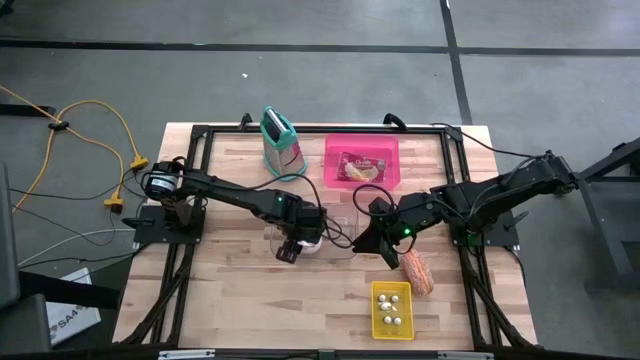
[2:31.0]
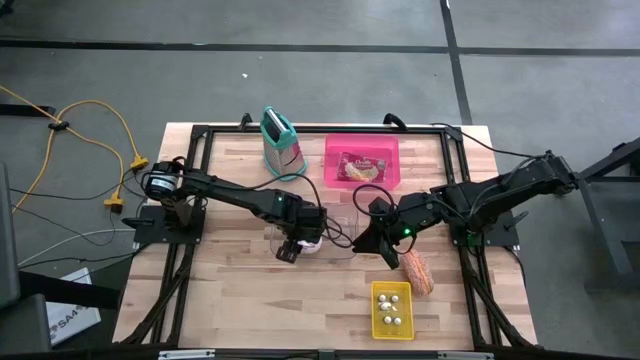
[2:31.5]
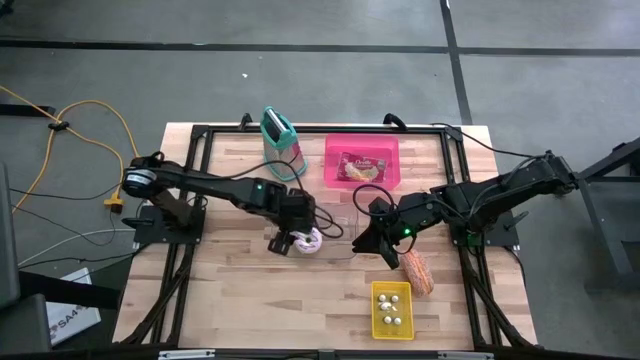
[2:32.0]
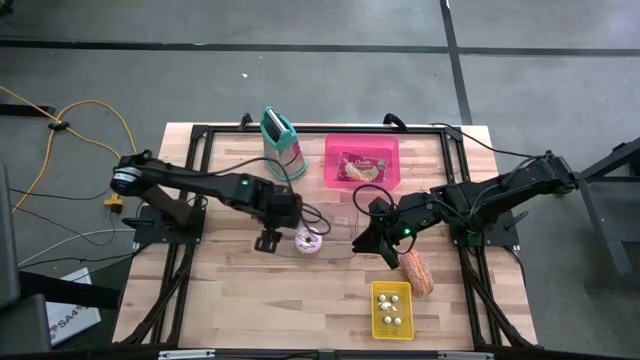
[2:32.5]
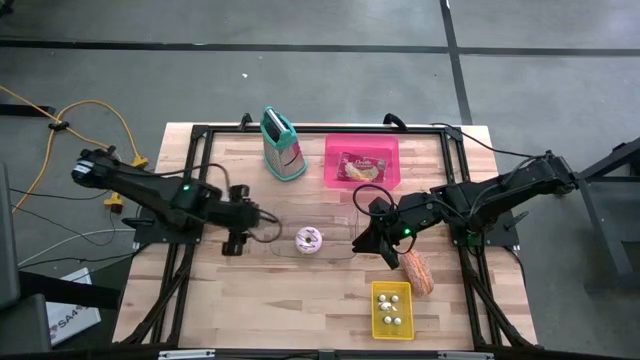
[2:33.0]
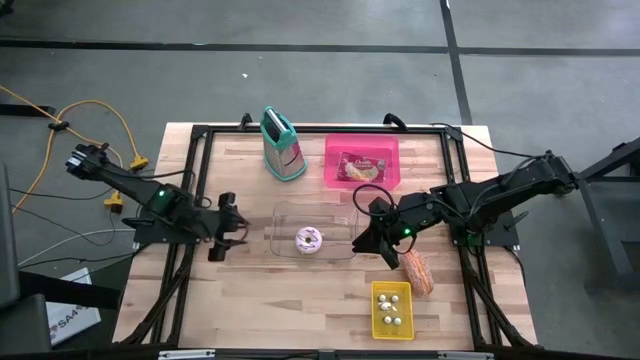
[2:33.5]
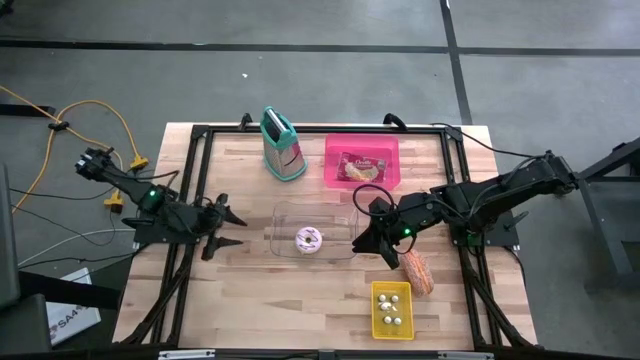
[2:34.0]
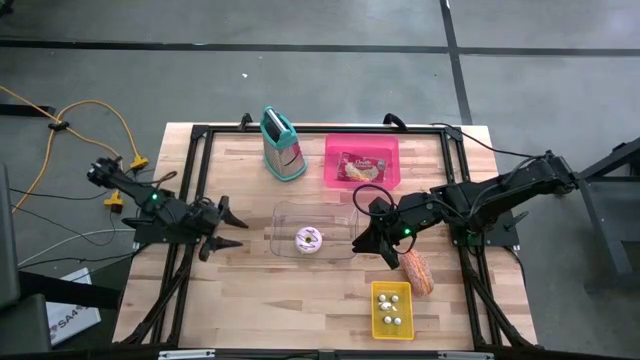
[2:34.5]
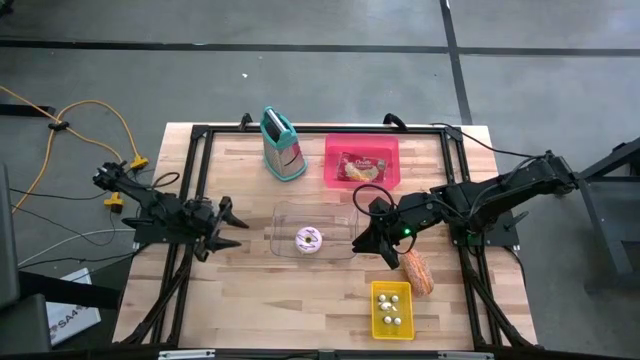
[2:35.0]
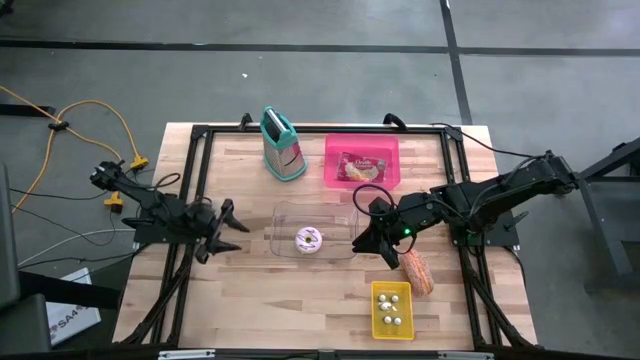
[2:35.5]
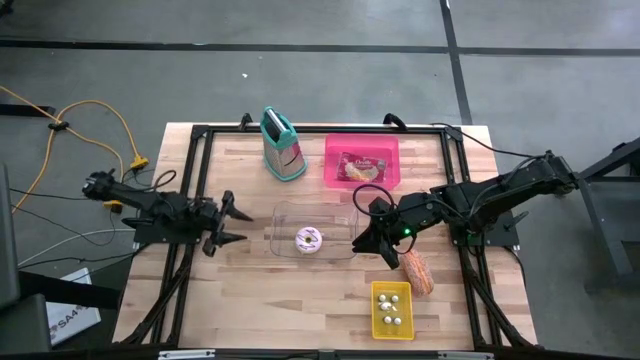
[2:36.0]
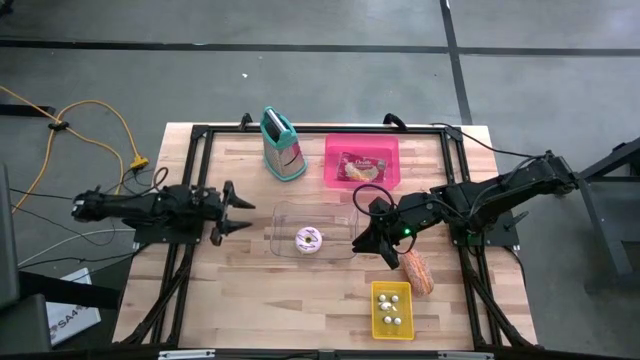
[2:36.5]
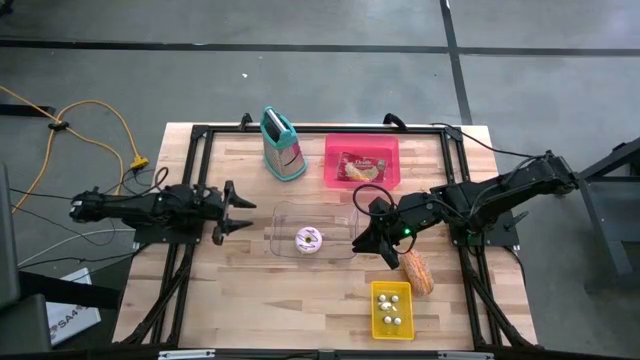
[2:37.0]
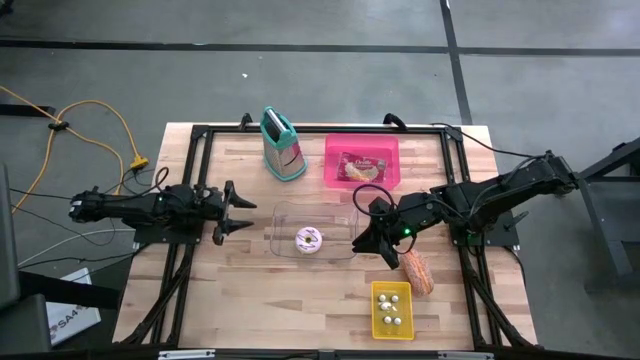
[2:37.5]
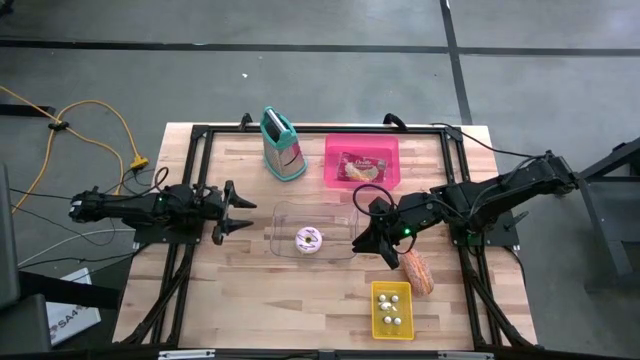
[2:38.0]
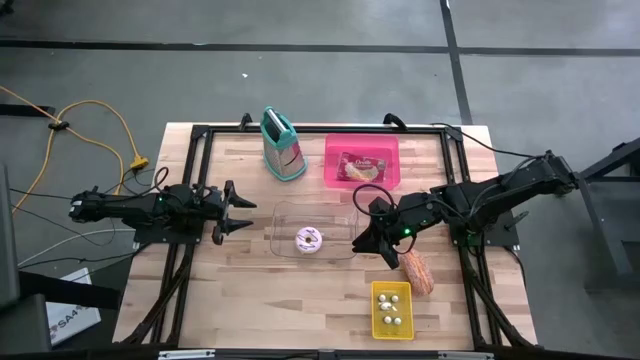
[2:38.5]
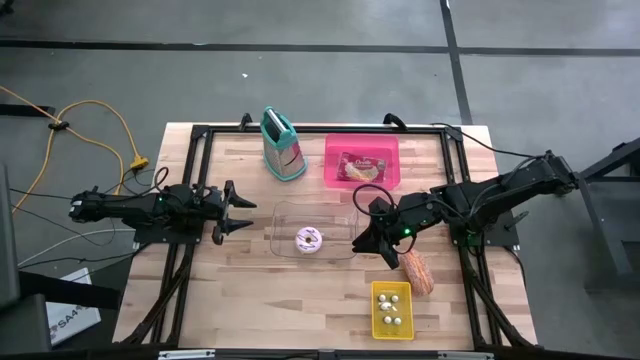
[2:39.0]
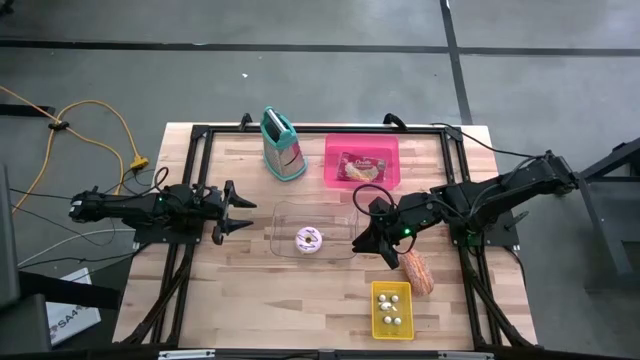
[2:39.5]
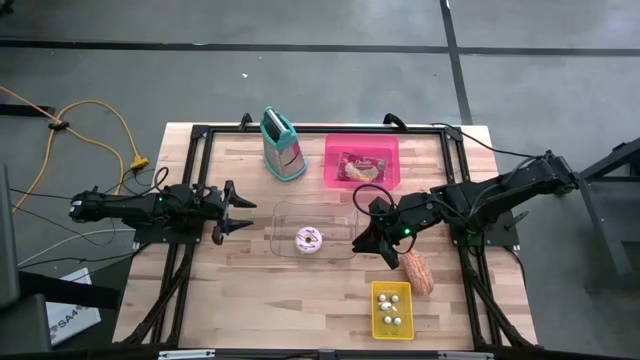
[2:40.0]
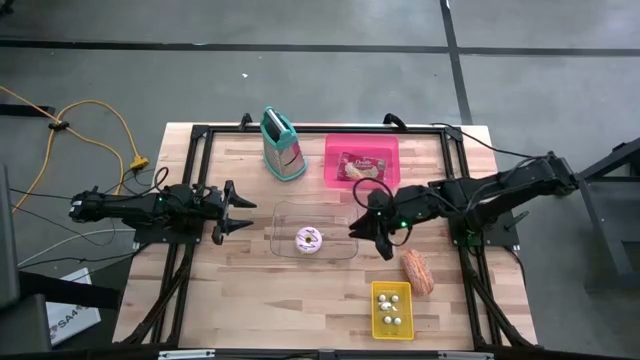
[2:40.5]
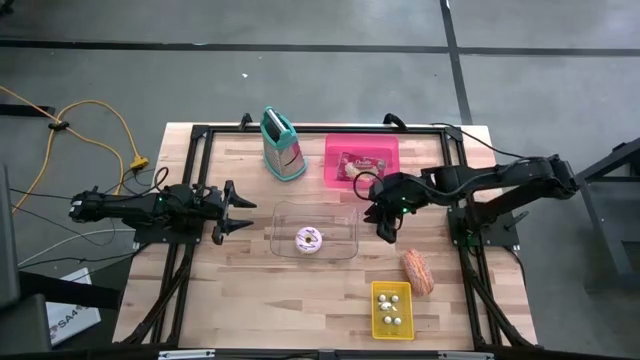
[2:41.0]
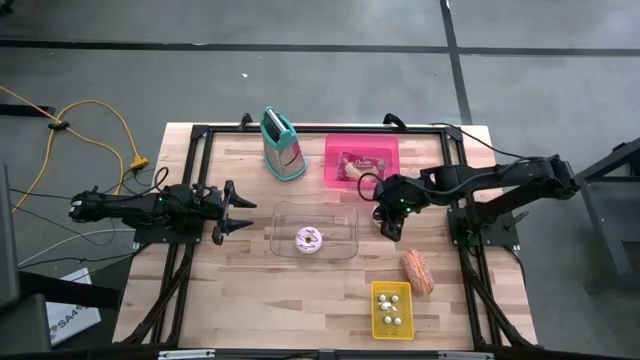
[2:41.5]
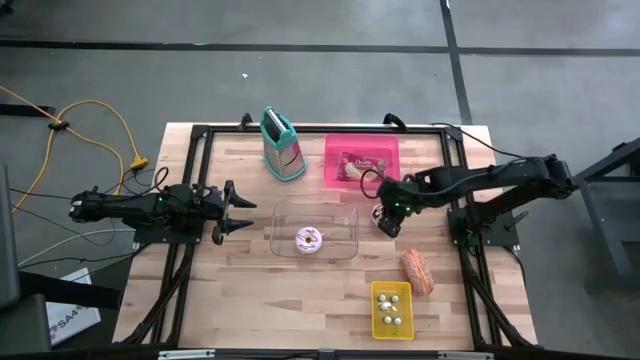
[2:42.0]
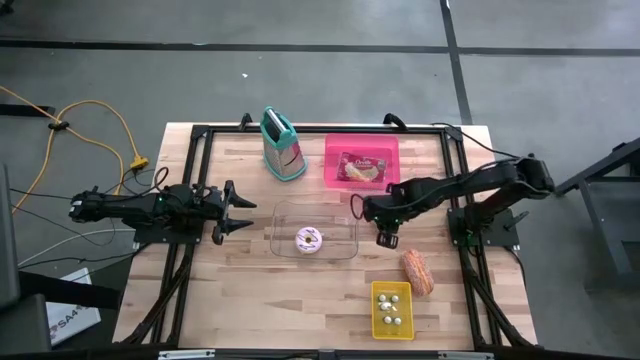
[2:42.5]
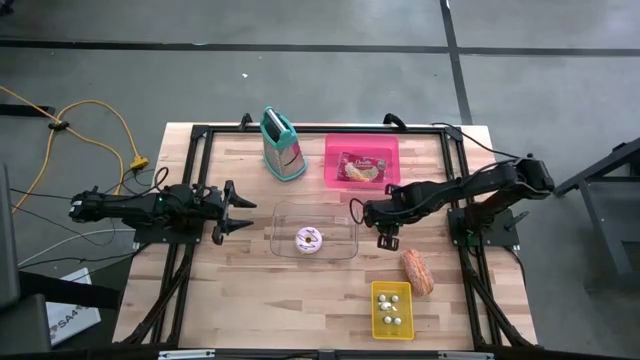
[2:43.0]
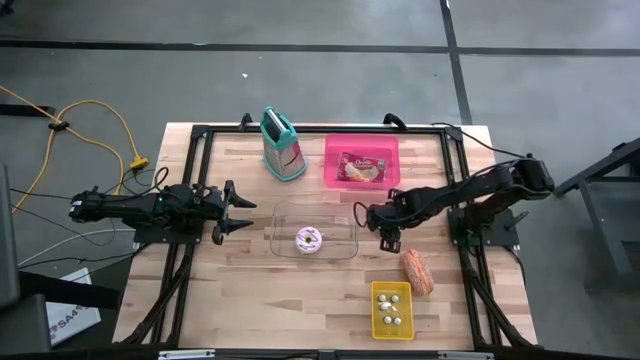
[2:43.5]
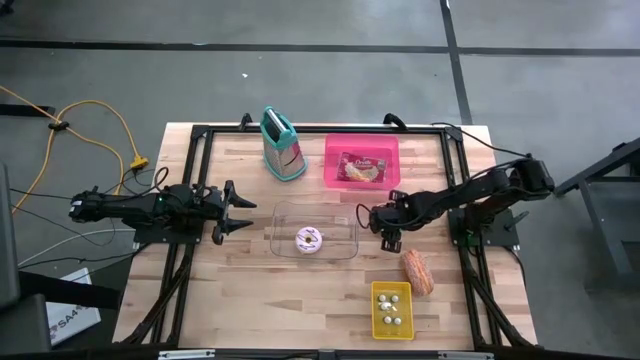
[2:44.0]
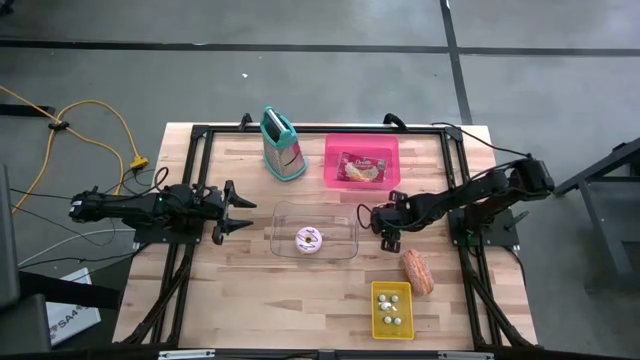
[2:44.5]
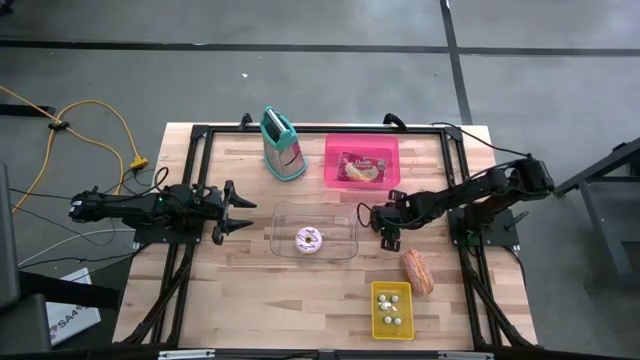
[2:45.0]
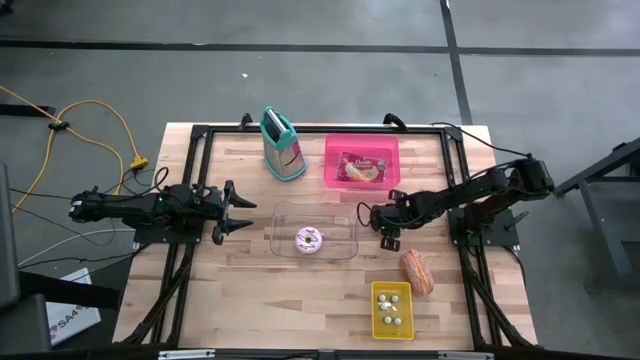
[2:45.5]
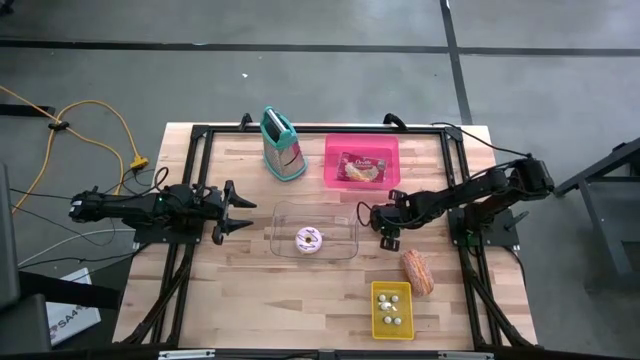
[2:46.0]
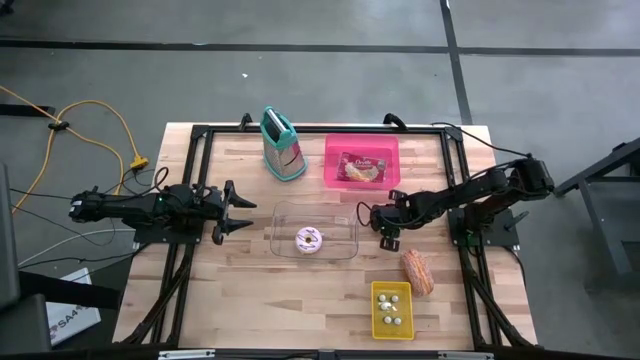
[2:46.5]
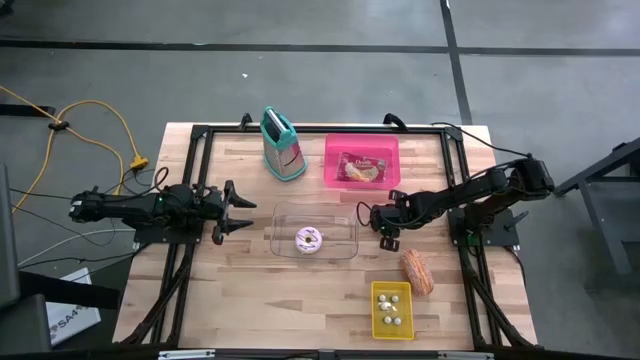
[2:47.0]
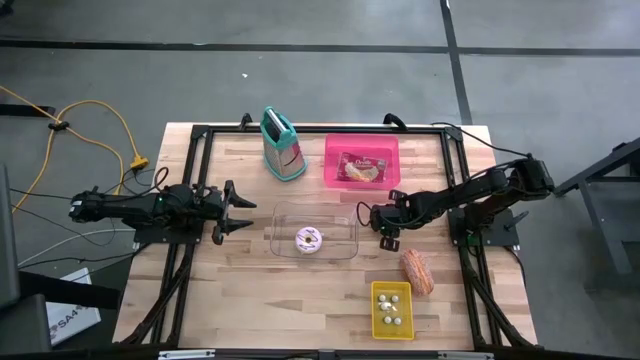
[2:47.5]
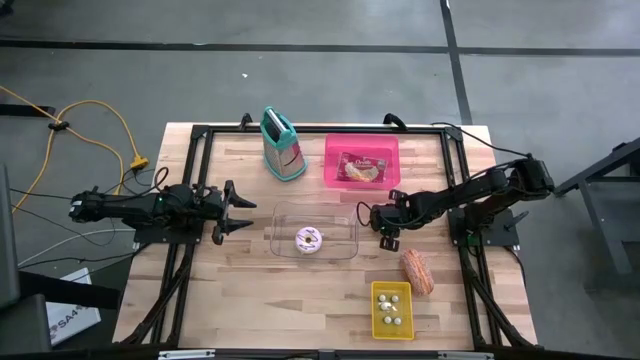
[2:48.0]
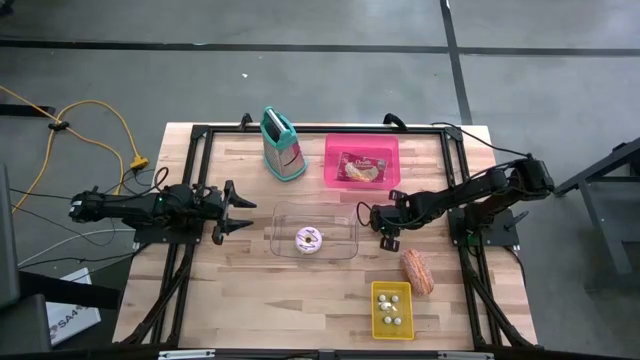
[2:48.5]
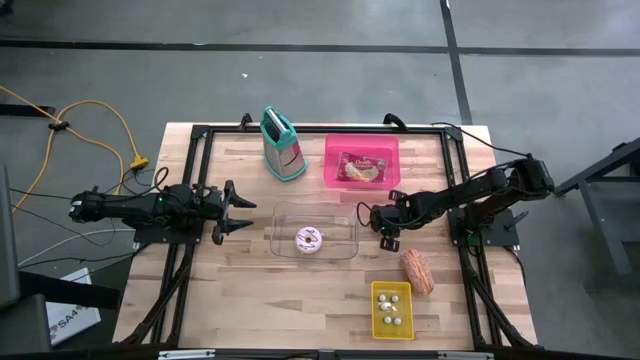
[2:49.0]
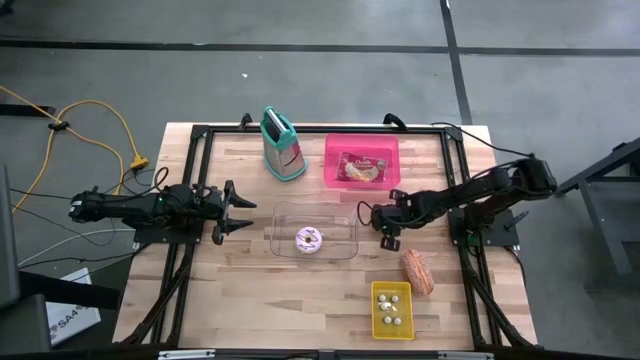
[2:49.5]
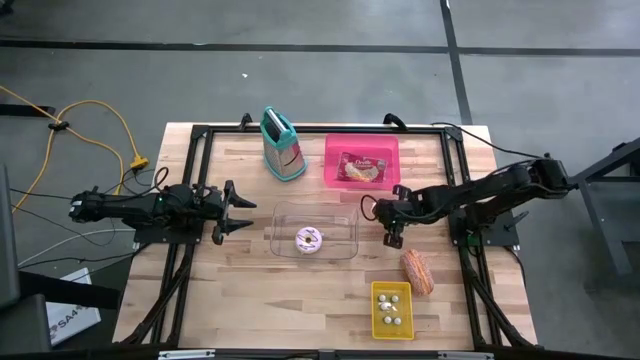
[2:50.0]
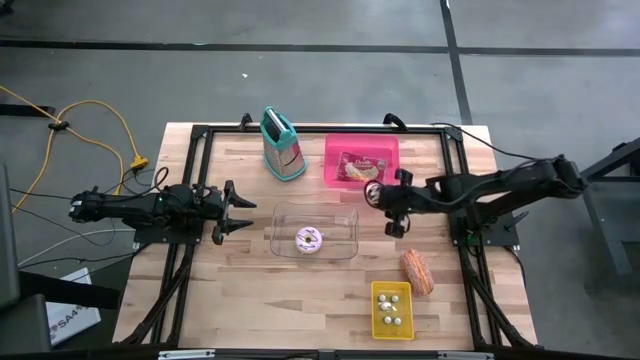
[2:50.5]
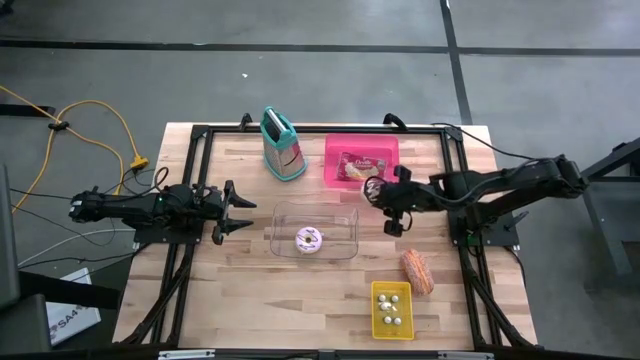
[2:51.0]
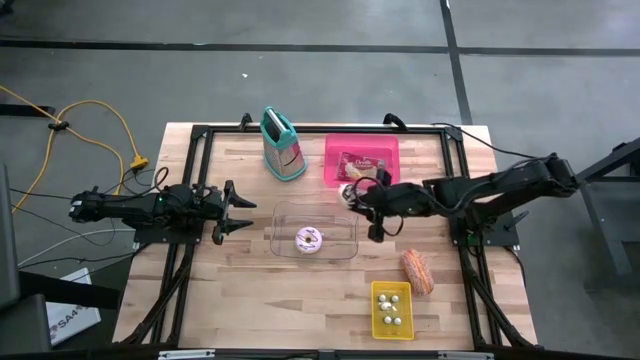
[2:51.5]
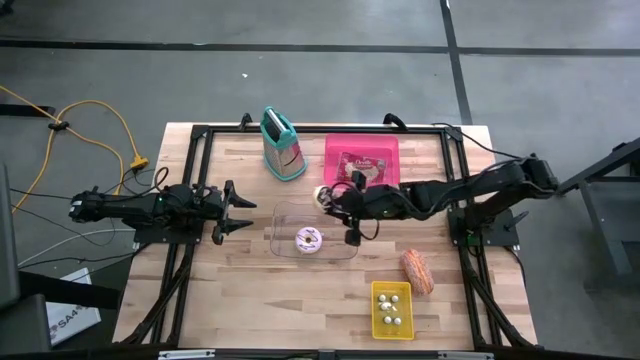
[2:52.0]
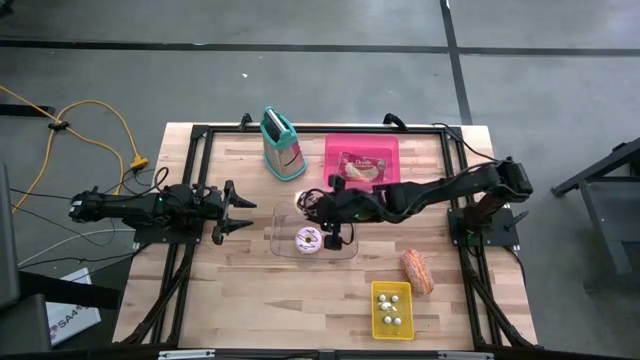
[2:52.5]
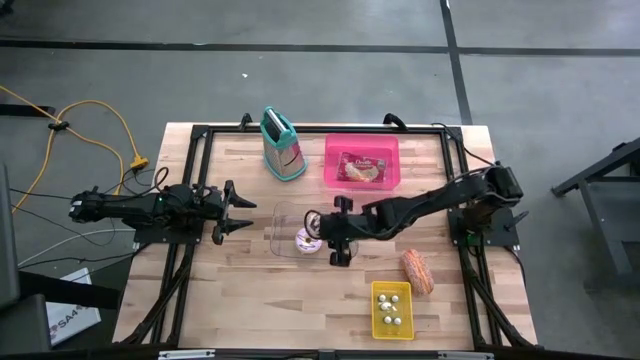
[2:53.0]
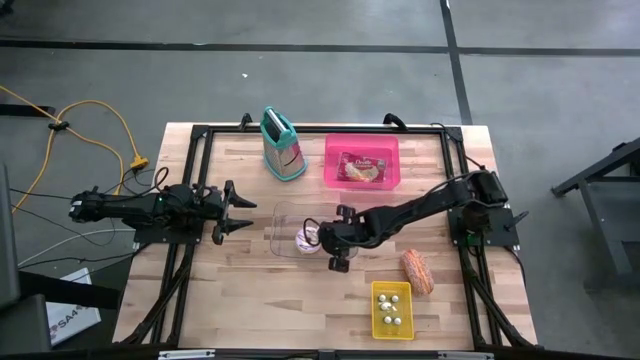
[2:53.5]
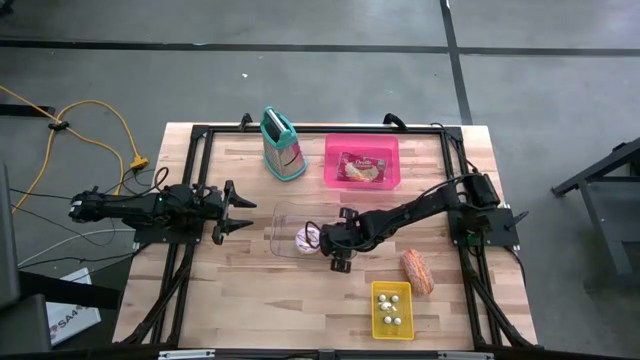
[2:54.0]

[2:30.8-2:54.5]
Put the black donut into the transparent bin
